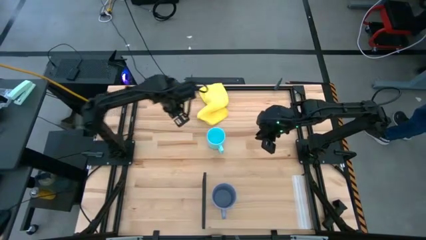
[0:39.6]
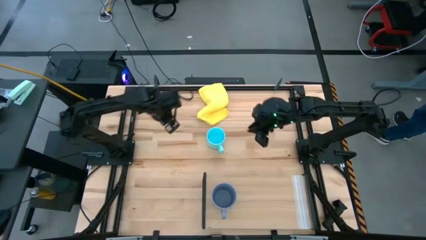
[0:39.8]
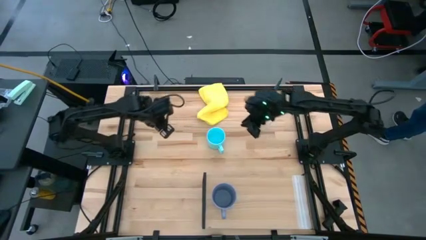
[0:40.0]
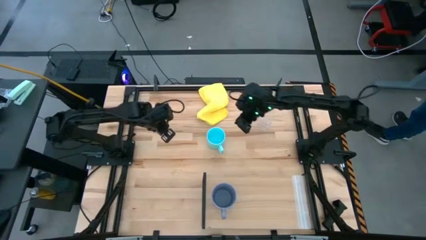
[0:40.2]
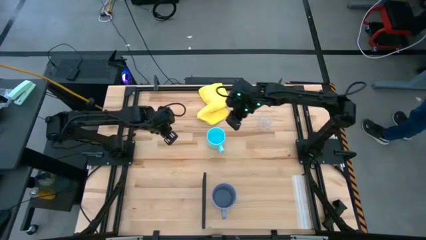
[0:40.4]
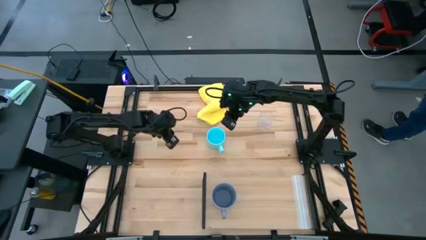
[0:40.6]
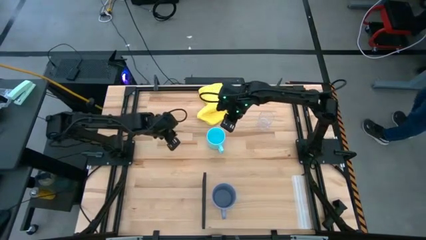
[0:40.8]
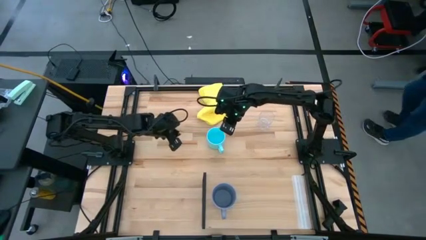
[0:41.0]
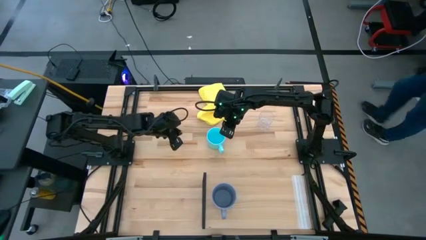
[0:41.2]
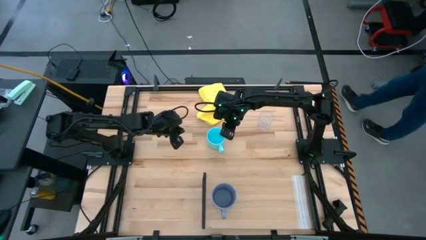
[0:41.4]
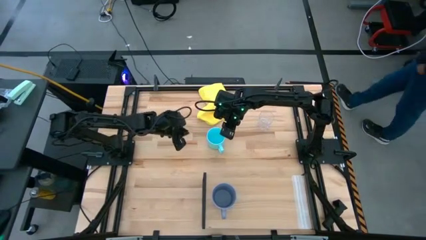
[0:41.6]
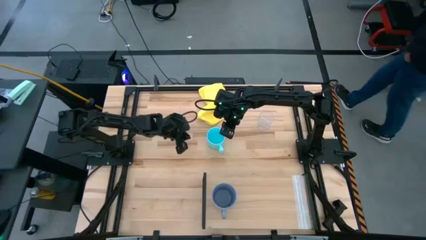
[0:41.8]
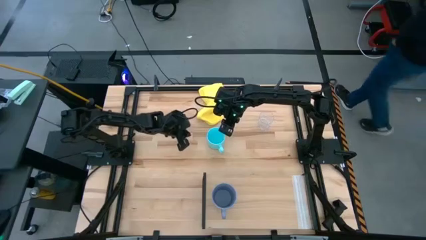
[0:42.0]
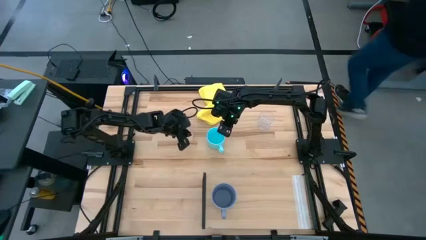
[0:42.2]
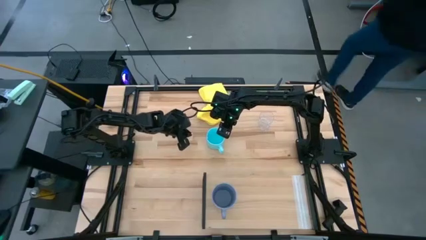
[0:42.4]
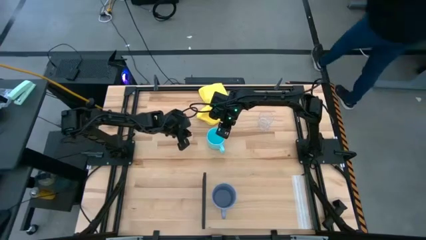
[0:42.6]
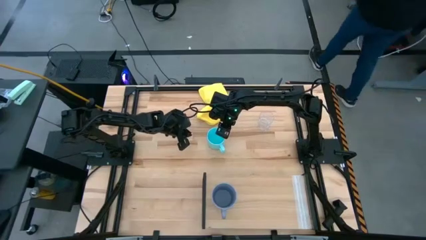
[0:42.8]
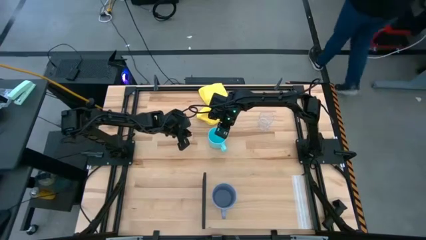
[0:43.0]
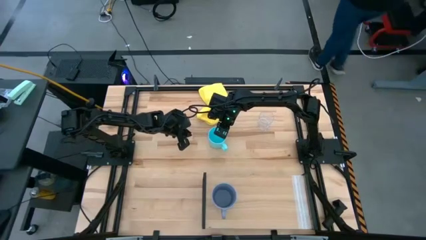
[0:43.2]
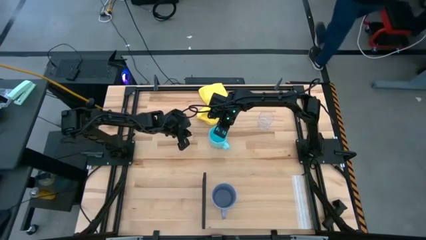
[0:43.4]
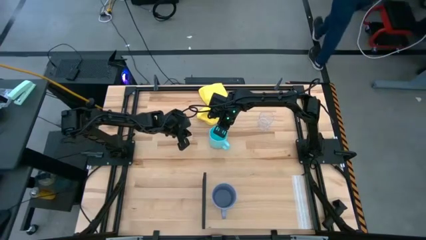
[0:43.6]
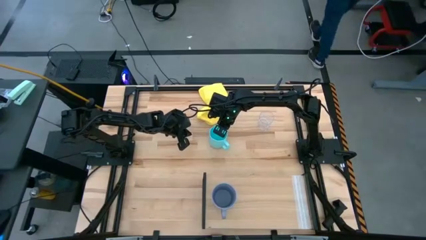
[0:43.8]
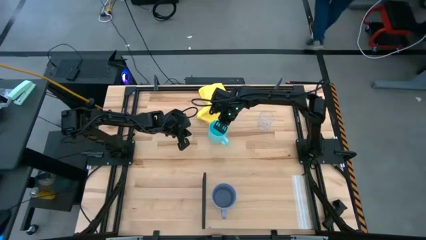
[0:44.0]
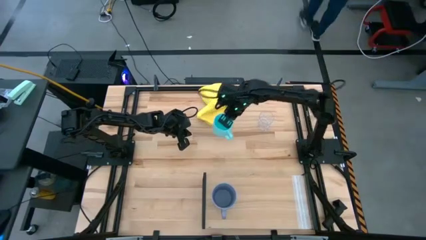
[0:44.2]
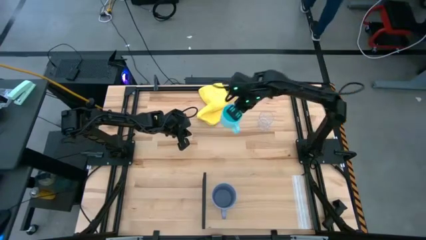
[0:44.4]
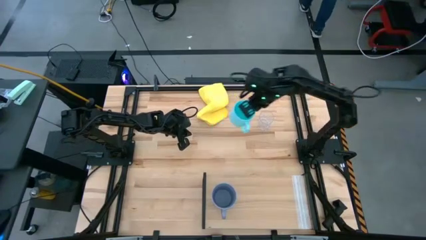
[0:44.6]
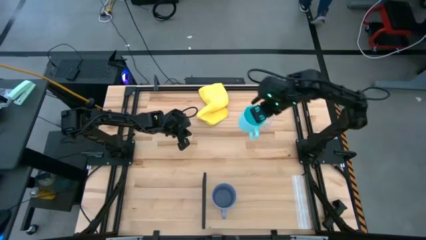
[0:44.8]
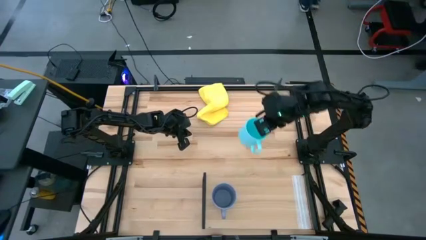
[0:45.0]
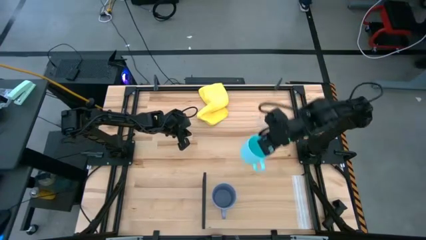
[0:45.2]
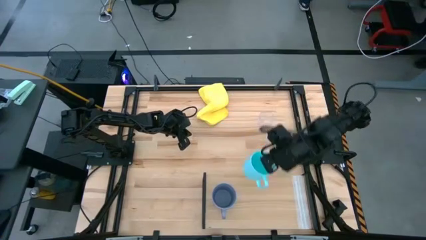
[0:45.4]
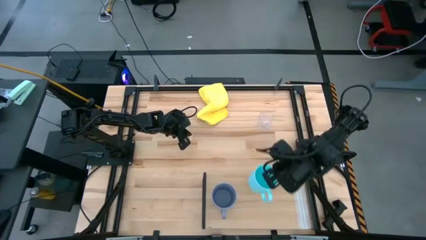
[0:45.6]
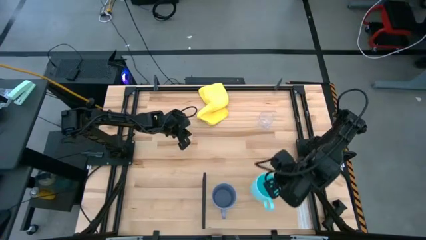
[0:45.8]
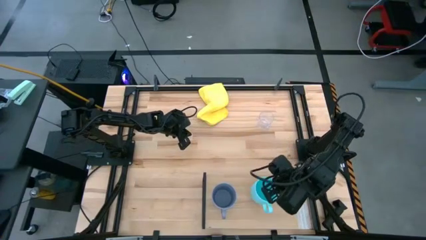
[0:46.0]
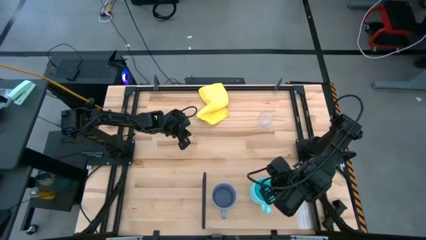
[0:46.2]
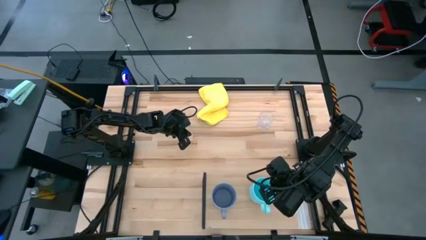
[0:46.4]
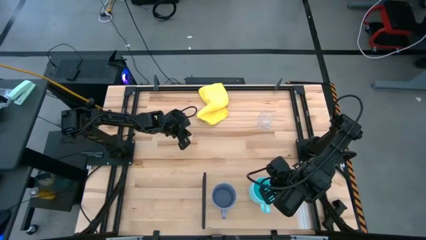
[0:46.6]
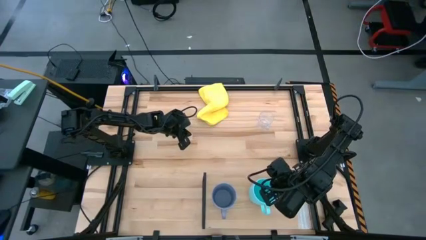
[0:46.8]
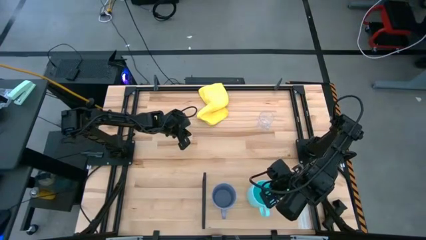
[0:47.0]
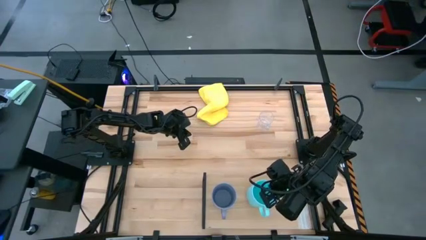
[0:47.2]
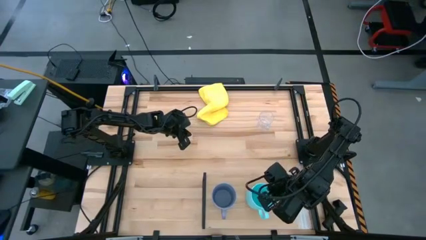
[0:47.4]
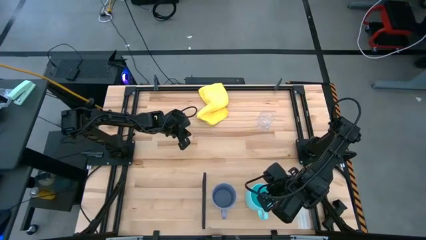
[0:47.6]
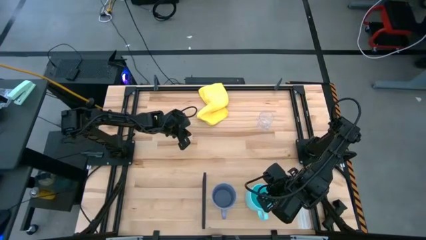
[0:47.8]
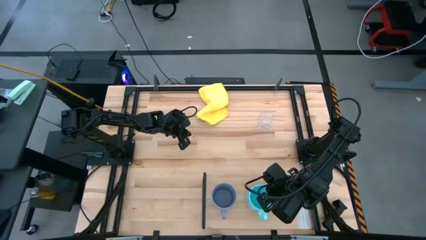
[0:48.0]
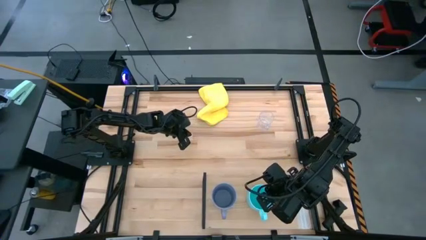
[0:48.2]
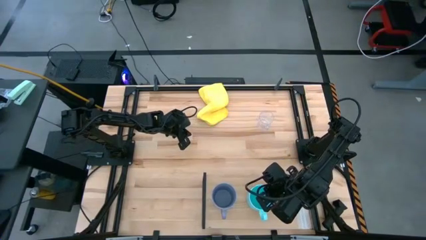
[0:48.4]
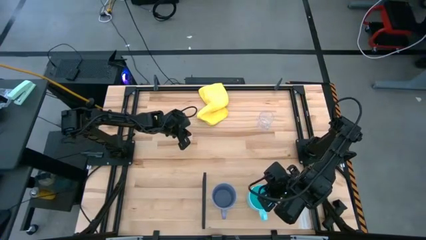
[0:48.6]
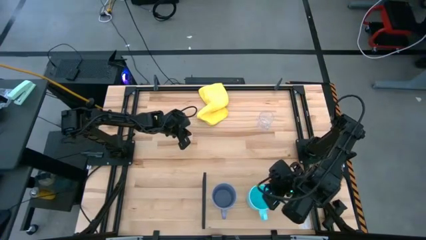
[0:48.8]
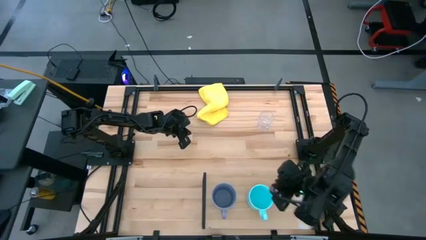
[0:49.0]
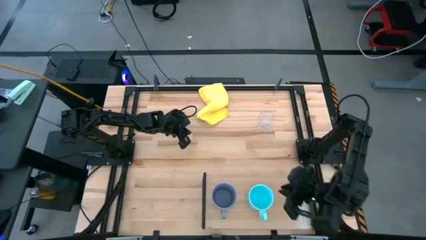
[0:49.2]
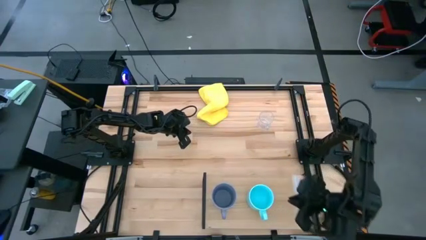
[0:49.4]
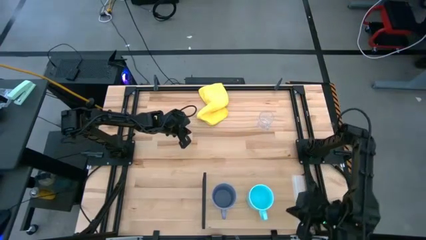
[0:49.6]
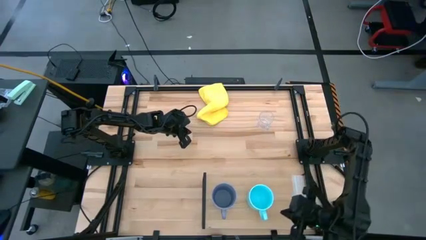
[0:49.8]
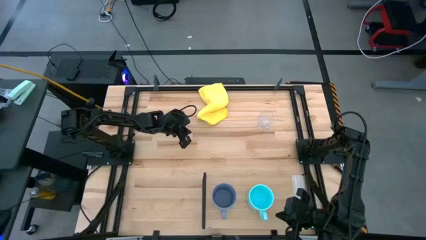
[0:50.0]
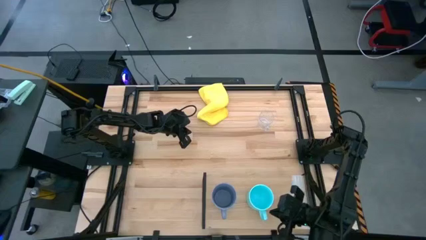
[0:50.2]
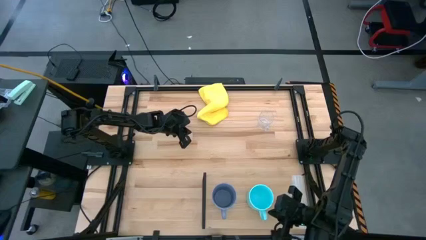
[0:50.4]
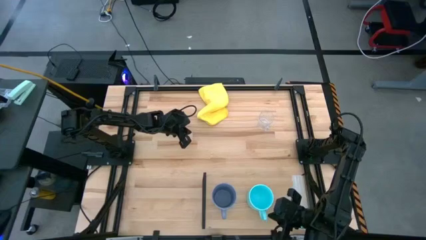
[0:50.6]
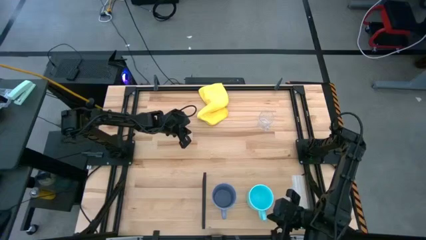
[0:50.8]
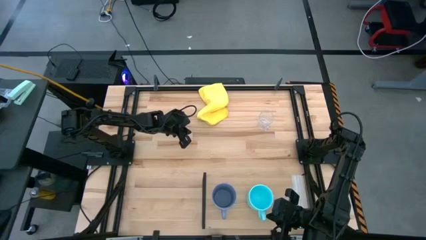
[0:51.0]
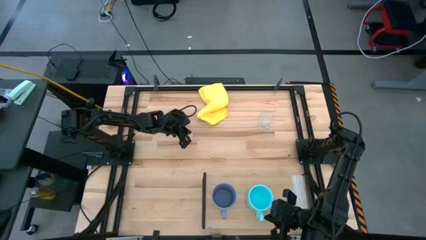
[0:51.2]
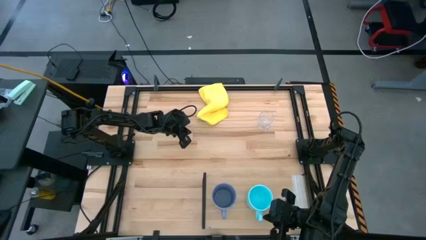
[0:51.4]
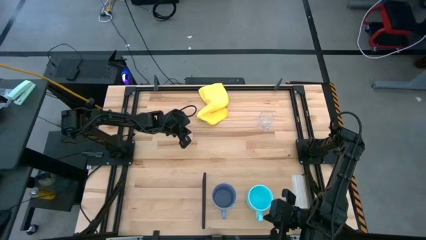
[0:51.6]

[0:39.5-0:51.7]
Task: Stack small to large cups/mugs on shelf
Put the light blue mug on the shelf

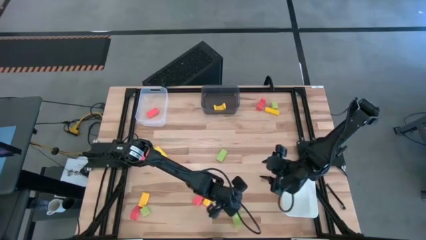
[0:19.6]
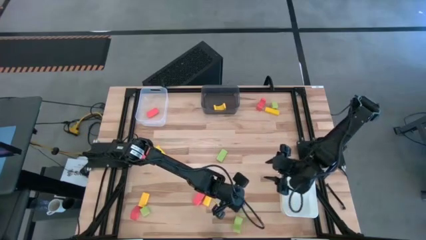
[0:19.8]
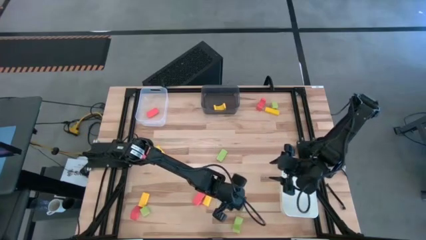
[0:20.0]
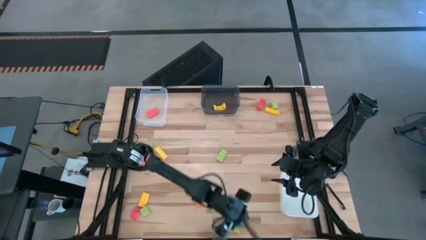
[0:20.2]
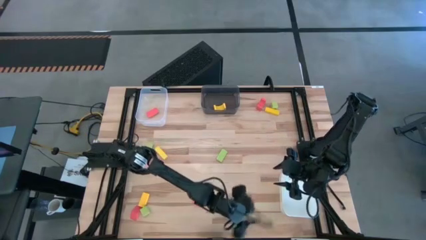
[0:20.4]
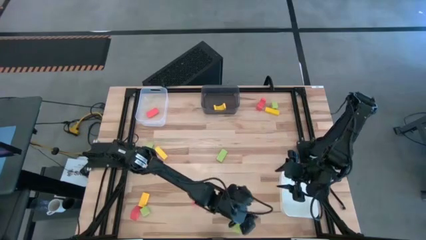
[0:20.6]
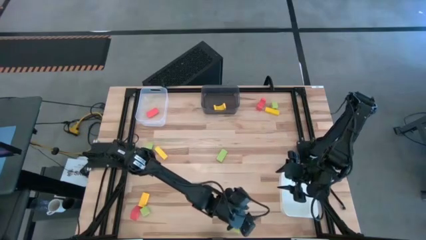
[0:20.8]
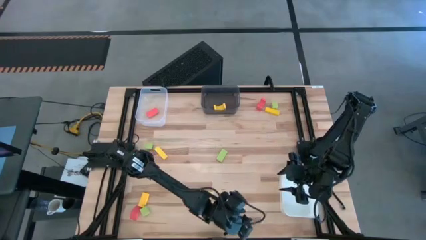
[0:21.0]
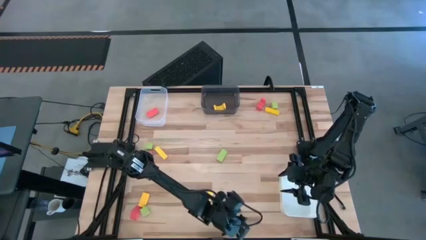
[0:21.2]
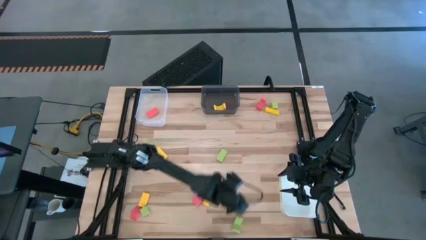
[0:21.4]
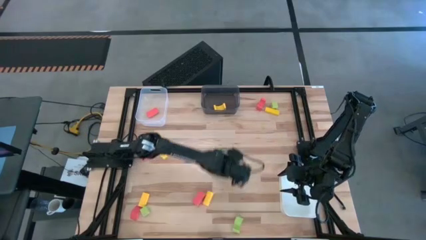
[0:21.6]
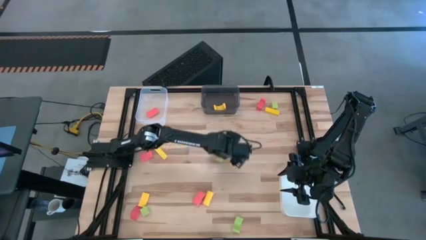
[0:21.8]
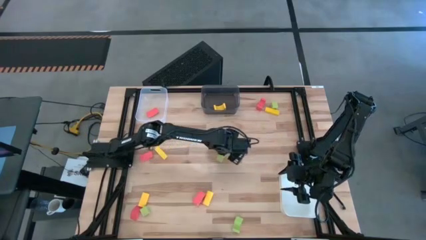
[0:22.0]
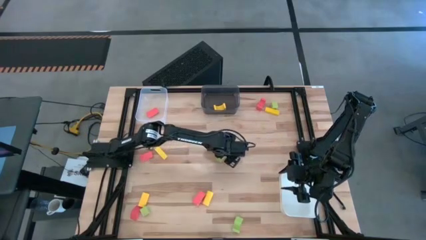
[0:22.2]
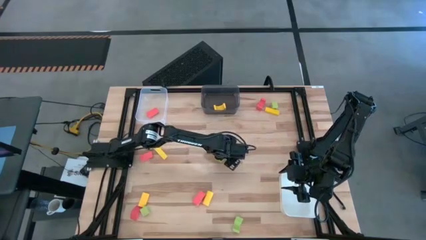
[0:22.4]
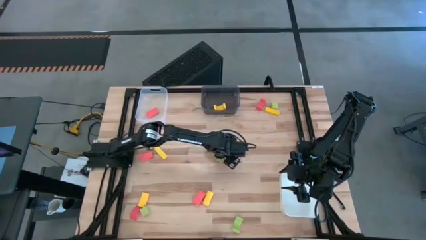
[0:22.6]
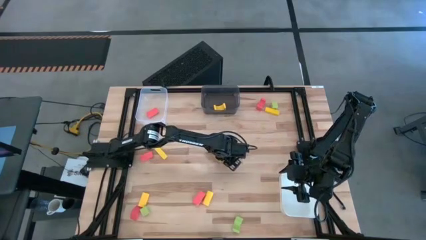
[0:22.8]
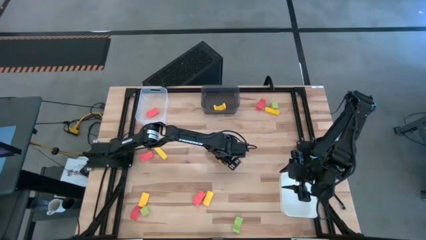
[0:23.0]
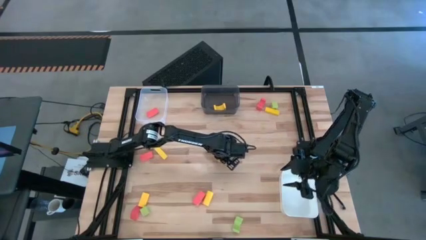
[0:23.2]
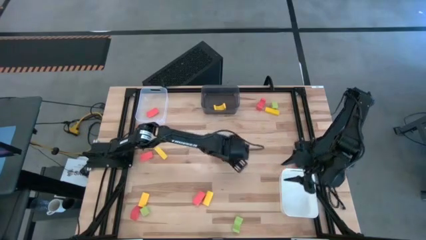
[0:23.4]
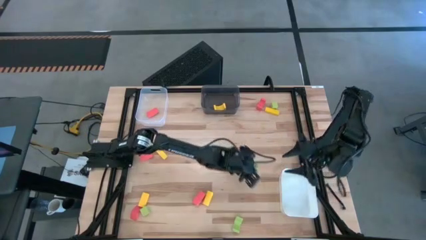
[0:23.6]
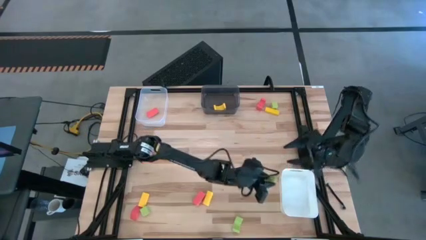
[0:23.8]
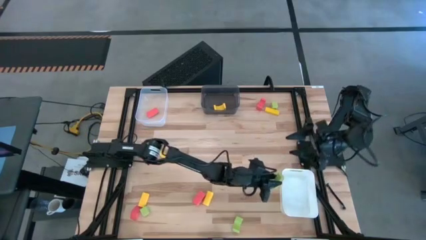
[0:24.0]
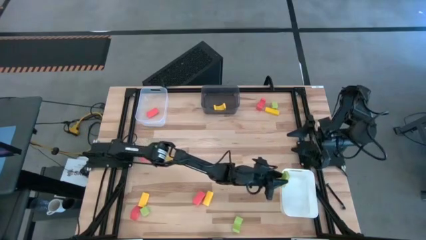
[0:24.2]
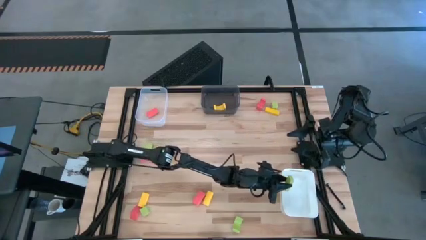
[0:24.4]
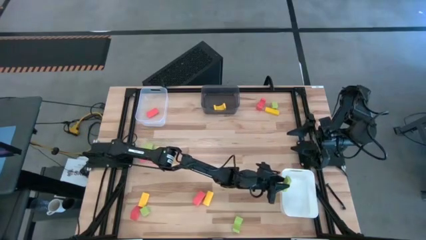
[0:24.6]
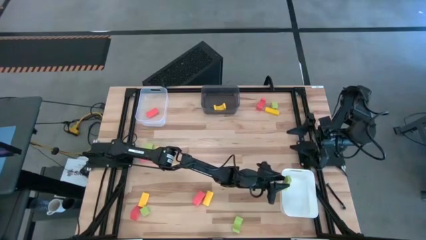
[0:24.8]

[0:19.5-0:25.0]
Task: Sort & place blocks by color
Put the green block into the white bin
